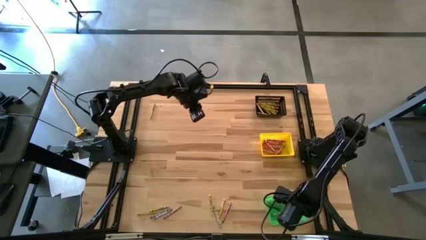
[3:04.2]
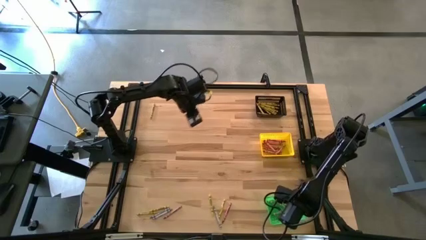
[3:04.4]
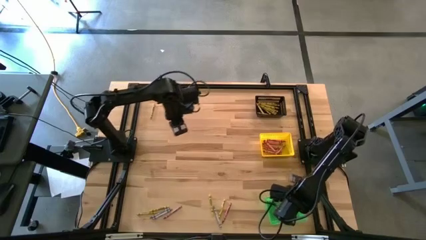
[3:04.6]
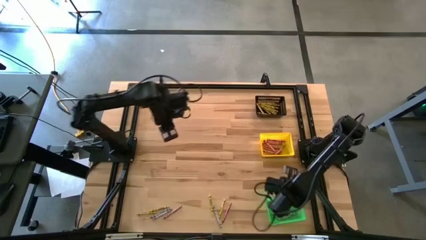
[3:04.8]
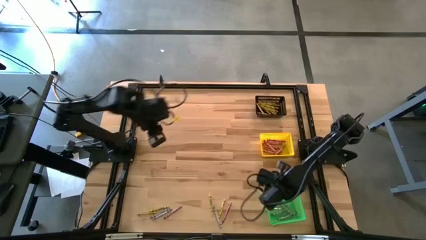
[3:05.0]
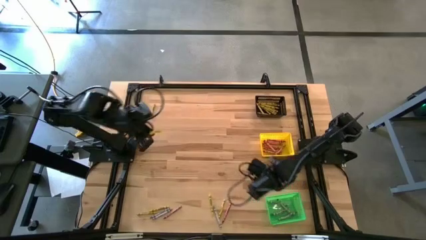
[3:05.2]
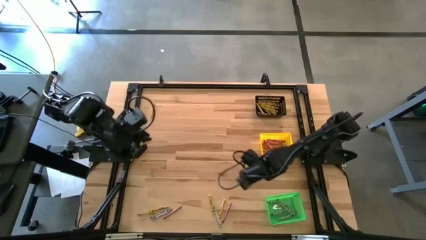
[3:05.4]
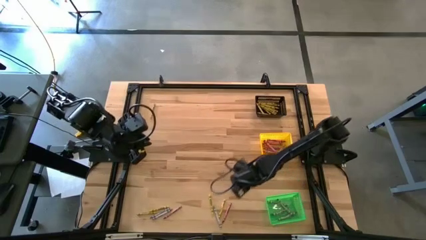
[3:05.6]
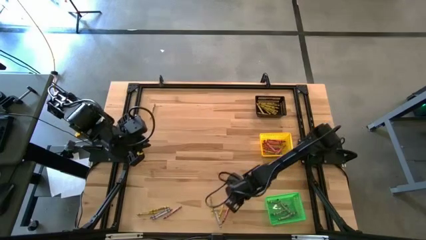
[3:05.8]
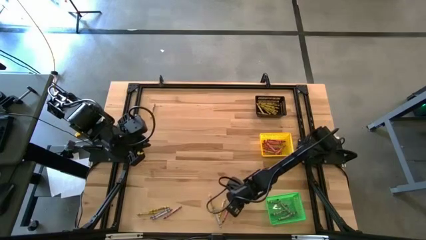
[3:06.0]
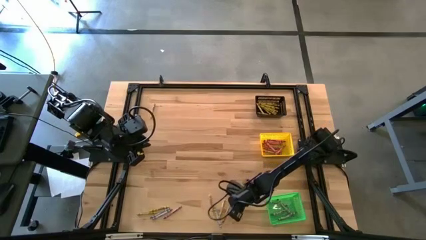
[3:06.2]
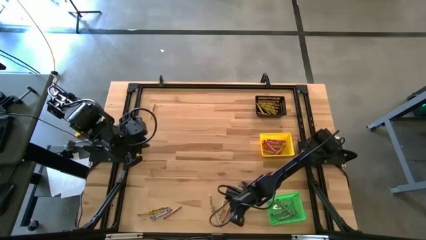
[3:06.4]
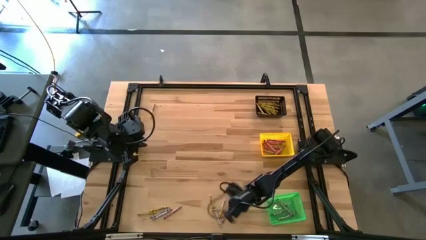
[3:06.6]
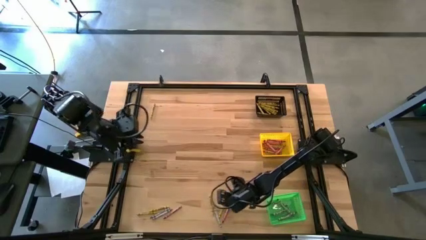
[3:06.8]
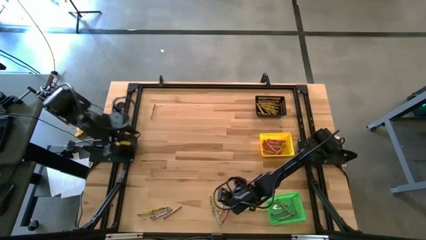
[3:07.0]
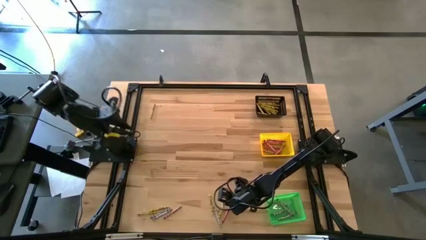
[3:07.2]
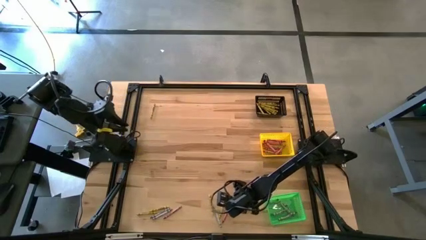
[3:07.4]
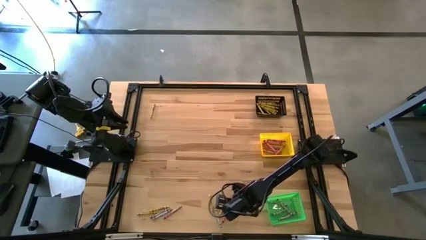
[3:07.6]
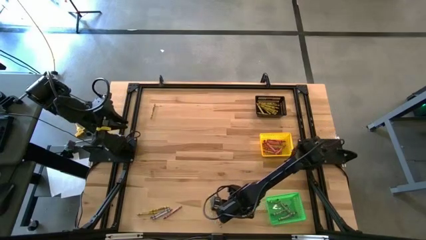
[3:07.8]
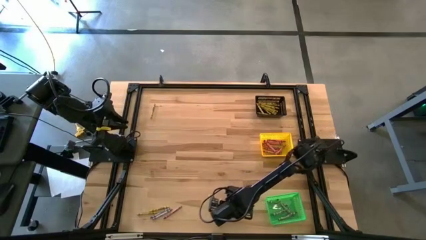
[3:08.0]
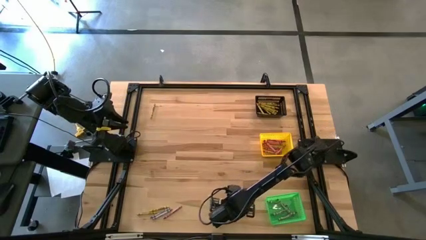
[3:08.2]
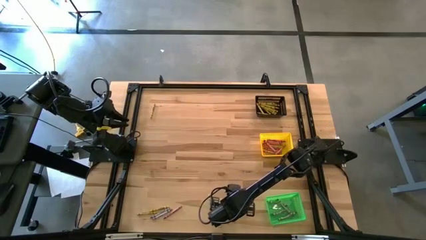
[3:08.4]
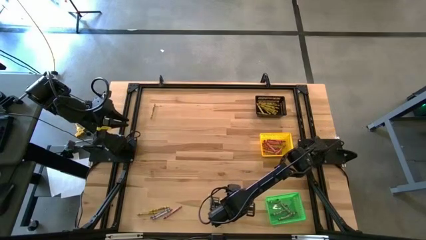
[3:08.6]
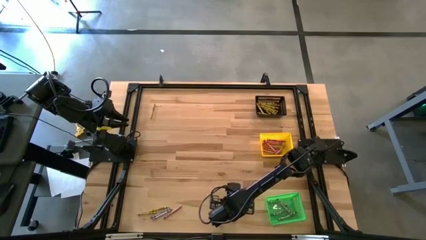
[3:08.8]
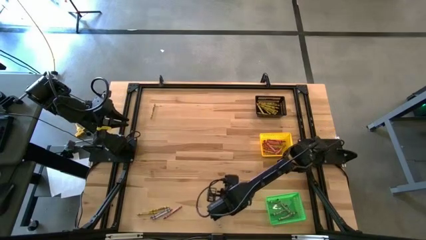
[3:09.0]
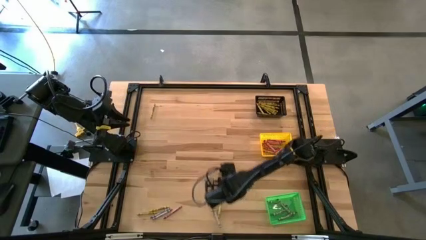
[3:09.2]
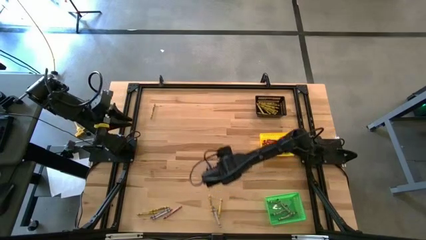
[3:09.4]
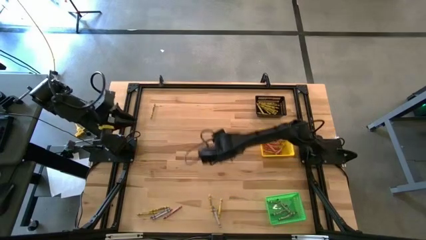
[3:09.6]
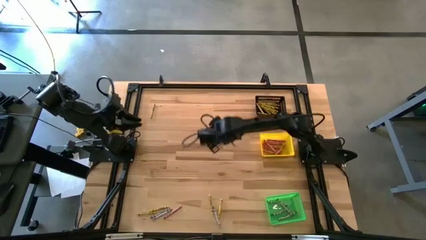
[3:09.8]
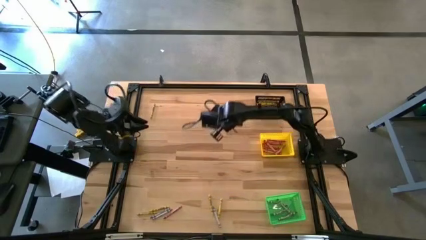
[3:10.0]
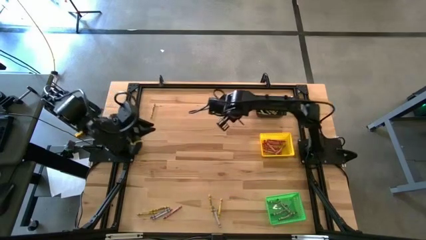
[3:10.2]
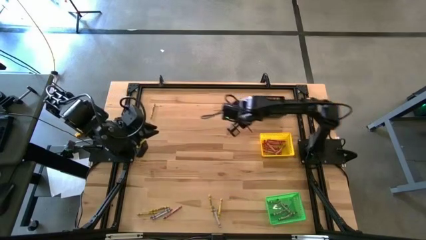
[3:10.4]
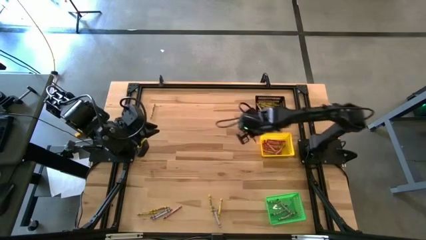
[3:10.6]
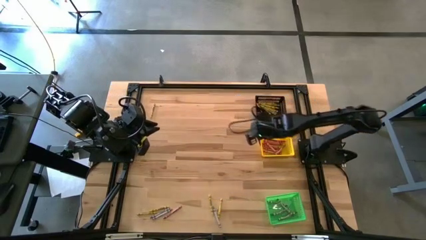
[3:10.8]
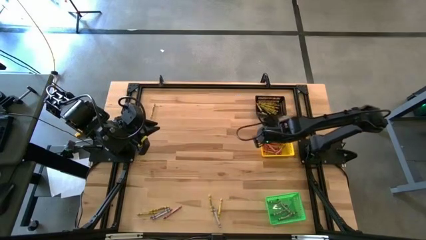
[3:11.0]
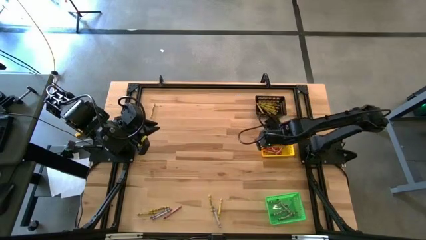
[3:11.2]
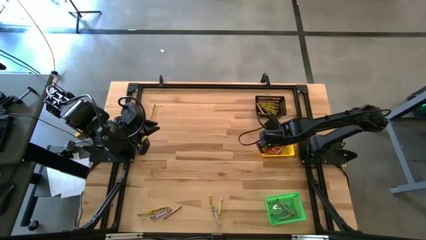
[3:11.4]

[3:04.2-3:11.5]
Task: Sort crayons
Put the red crayon into the yellow bin

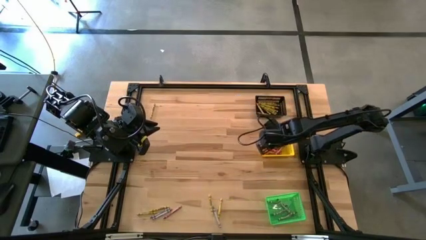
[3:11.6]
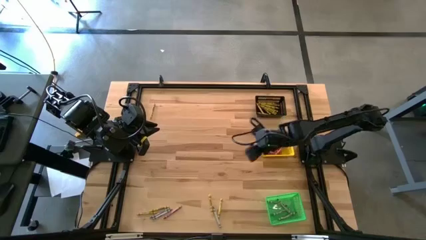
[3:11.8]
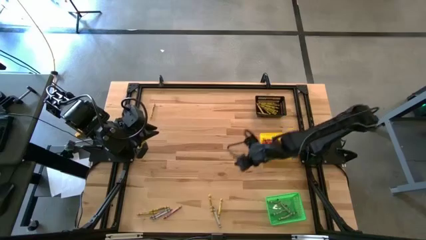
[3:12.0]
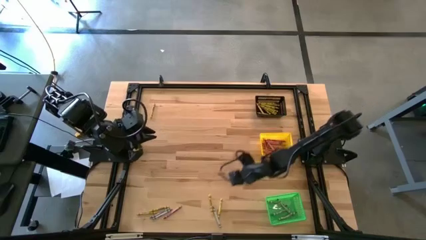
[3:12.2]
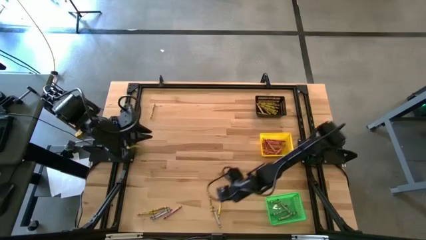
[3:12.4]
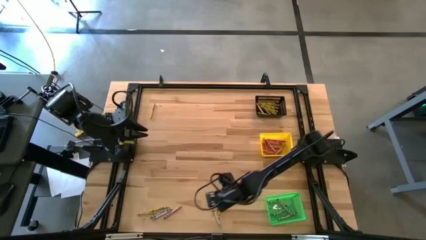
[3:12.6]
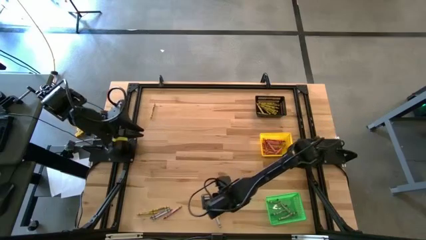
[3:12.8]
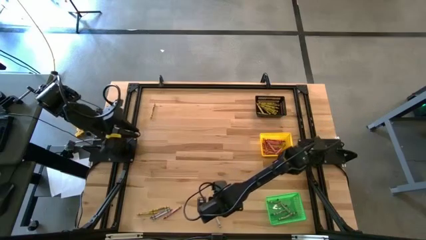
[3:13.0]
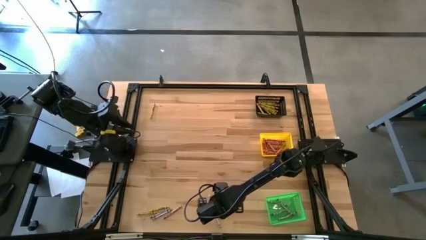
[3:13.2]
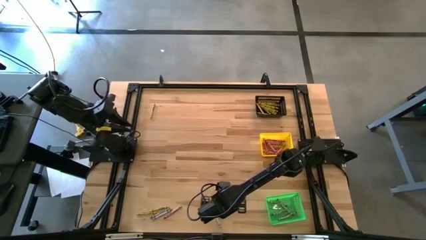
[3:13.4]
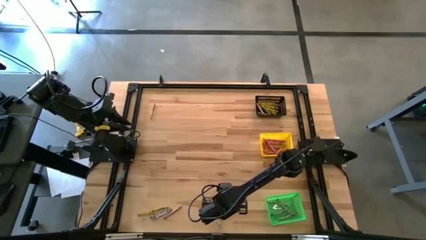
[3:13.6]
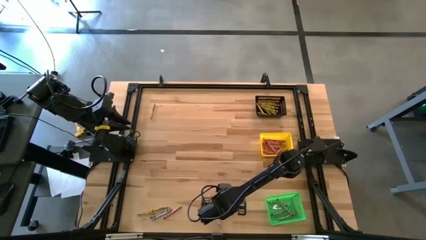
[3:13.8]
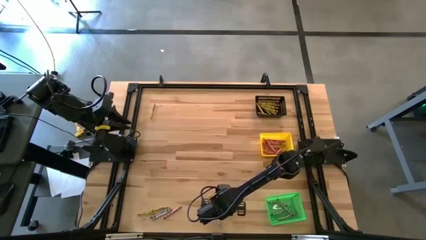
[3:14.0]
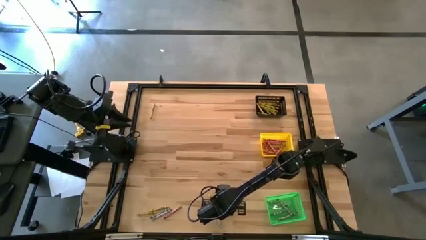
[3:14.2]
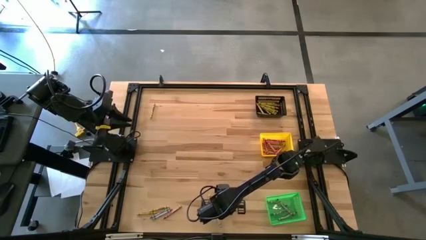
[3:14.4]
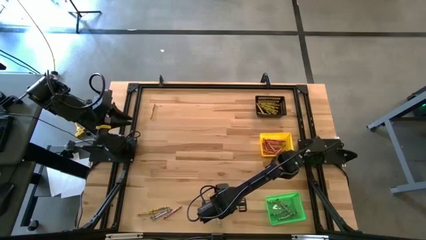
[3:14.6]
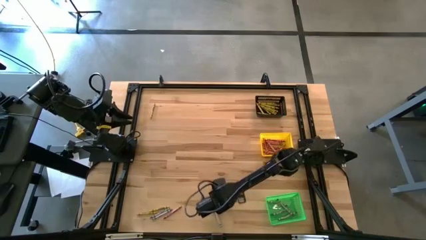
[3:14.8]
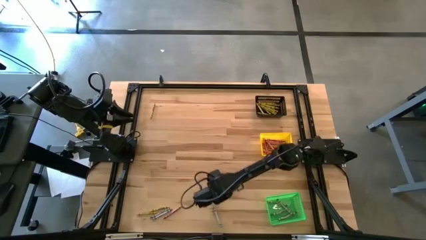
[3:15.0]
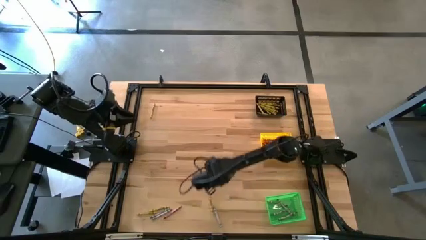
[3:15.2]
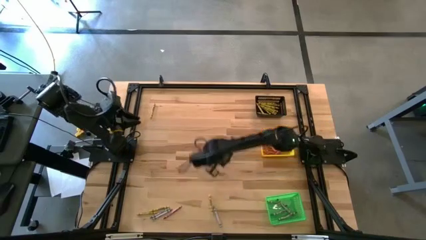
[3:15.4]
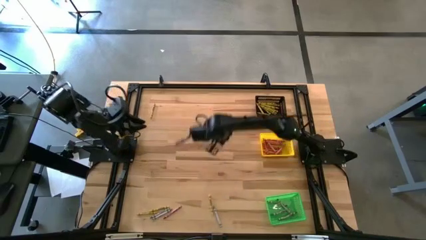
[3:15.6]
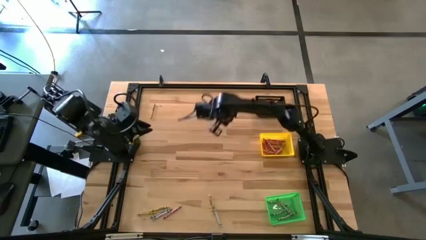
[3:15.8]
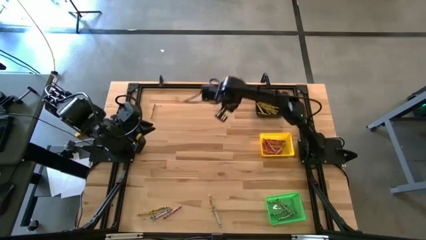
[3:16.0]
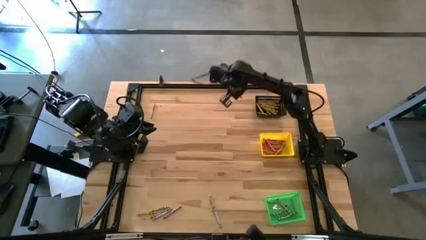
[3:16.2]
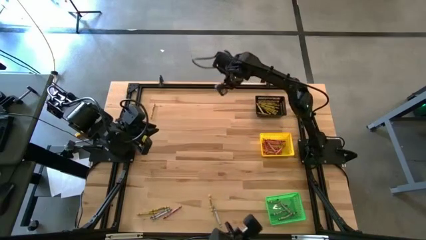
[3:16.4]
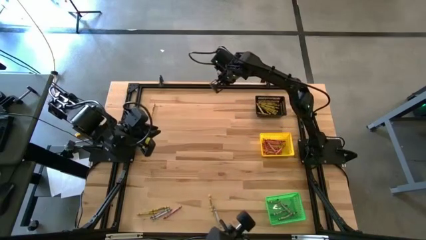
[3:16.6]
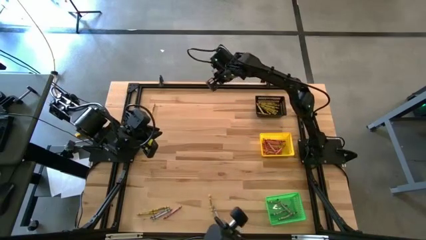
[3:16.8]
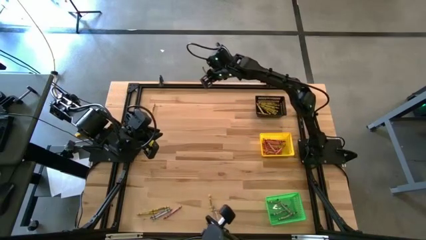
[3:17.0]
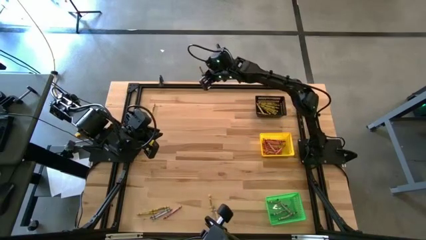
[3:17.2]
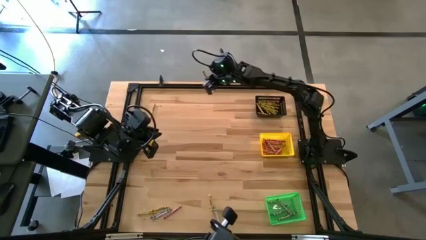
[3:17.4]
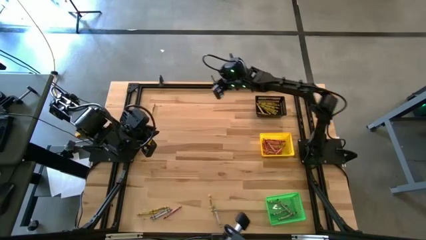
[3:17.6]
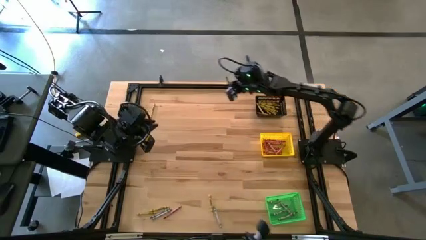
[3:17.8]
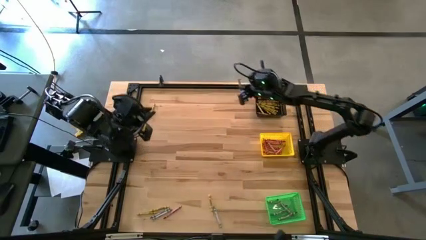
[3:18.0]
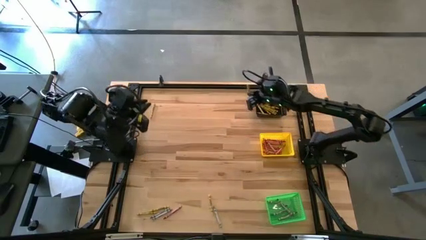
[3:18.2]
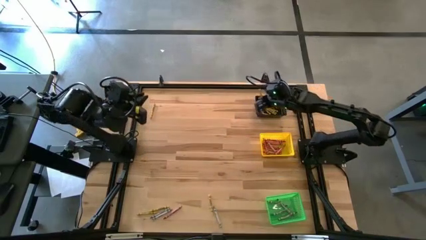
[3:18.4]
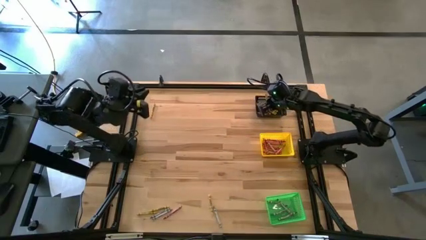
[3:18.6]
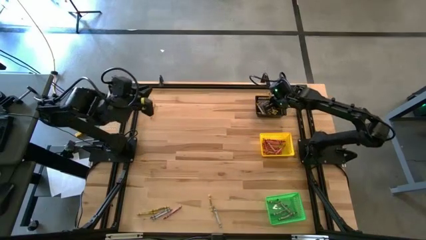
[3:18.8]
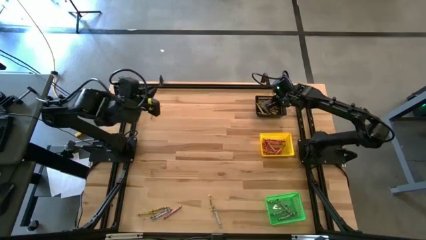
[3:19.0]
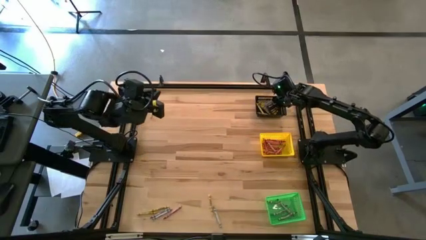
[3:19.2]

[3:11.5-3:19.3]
Put the yellow crayon into the black bin
